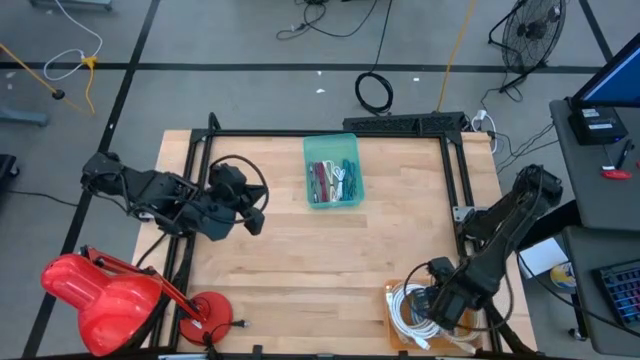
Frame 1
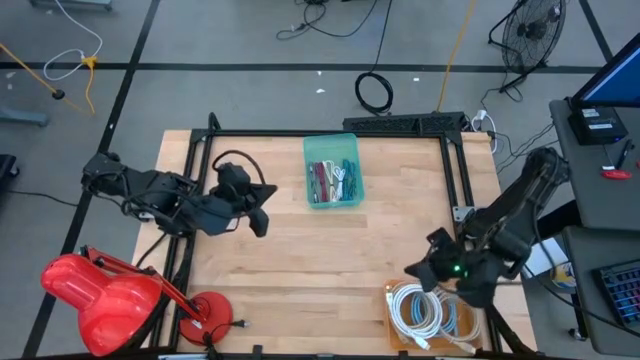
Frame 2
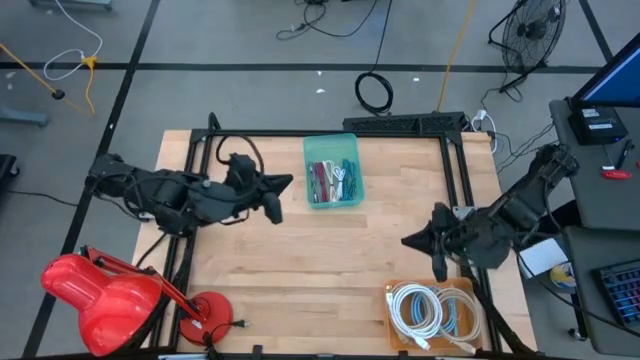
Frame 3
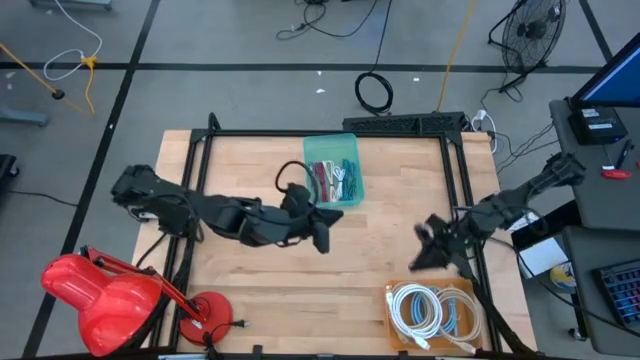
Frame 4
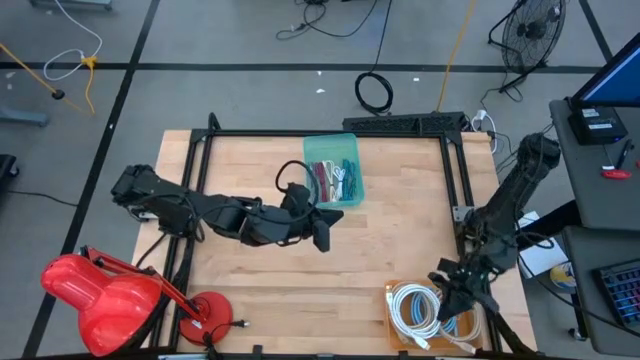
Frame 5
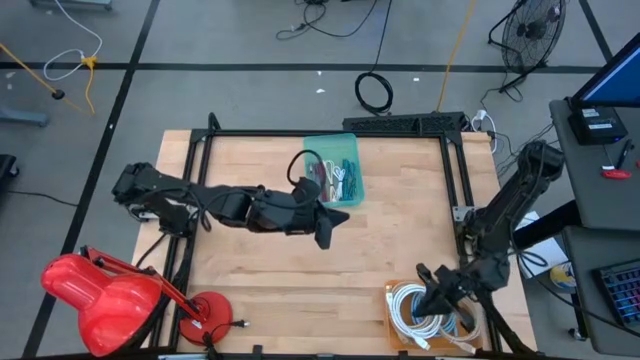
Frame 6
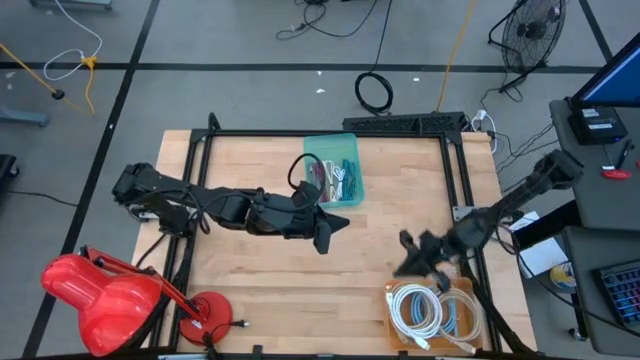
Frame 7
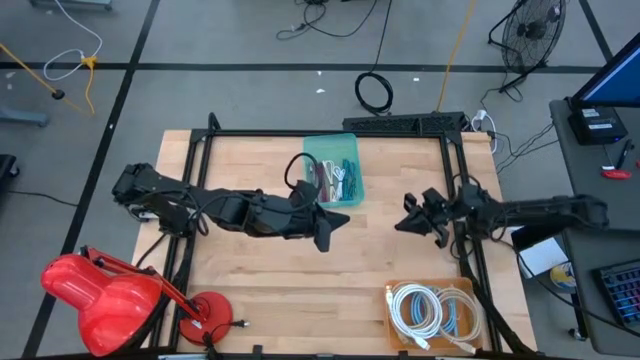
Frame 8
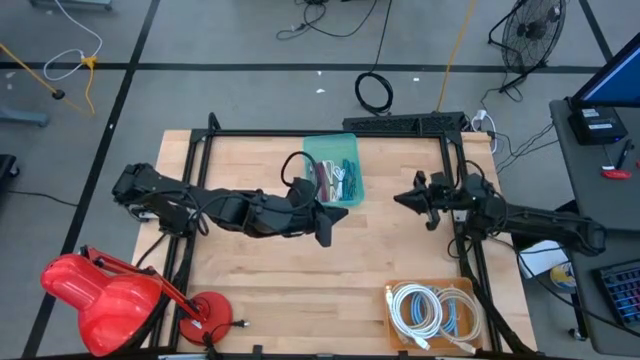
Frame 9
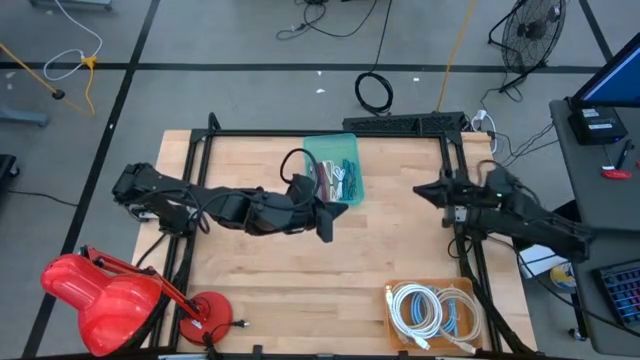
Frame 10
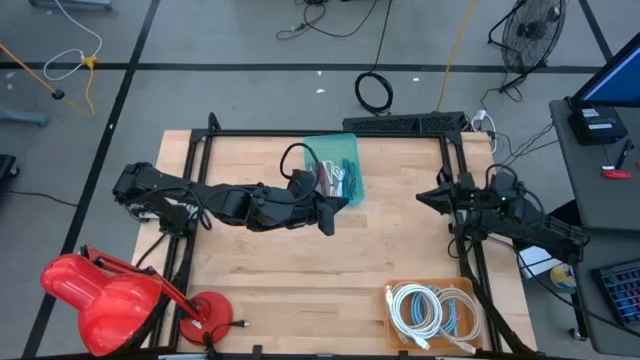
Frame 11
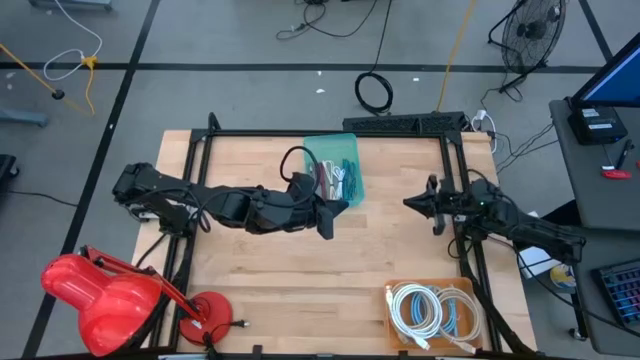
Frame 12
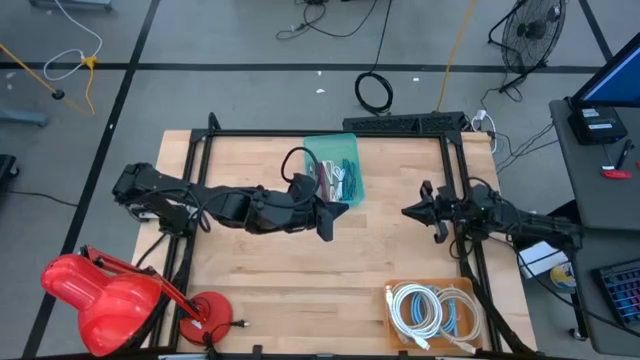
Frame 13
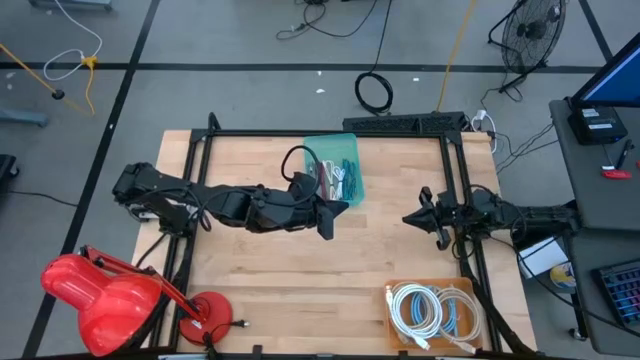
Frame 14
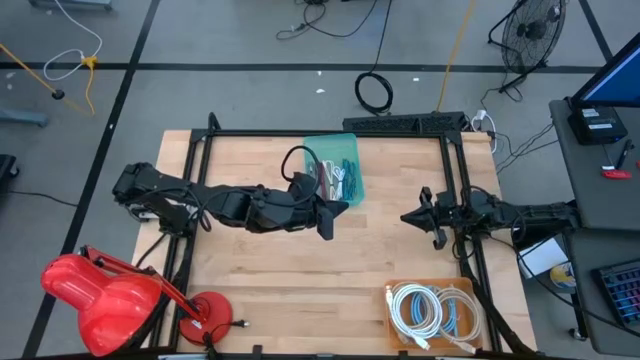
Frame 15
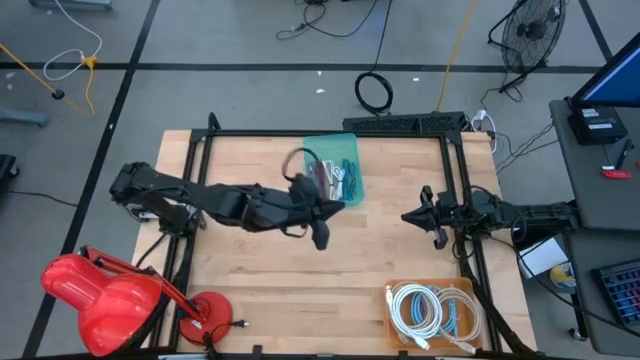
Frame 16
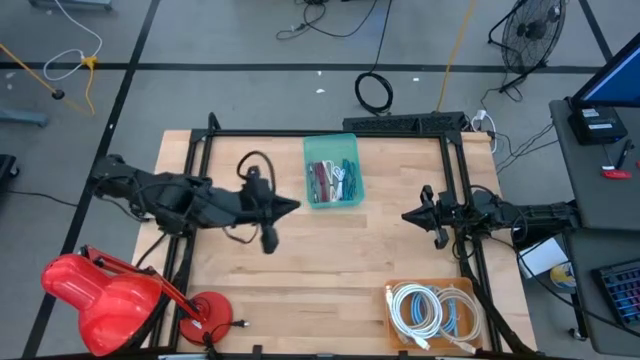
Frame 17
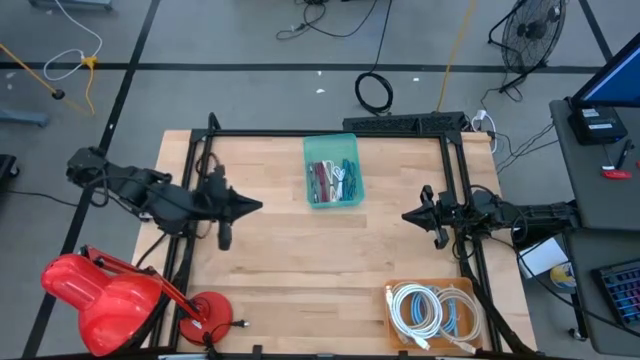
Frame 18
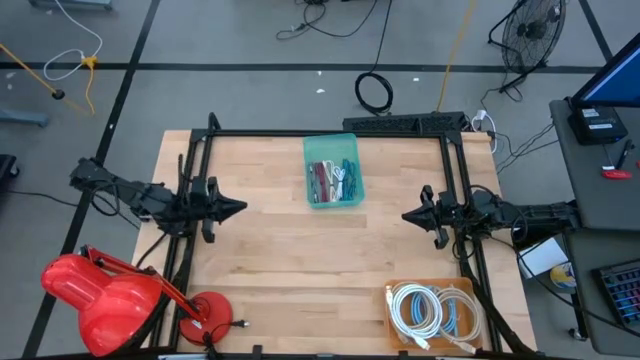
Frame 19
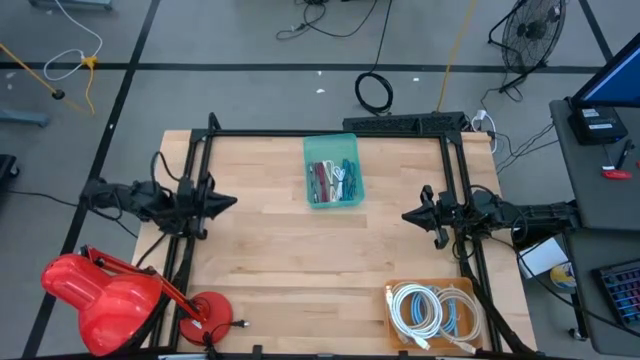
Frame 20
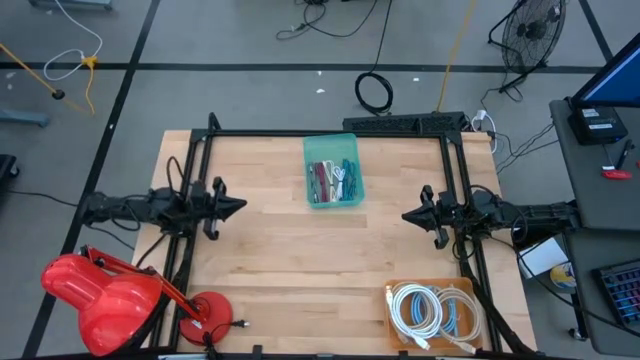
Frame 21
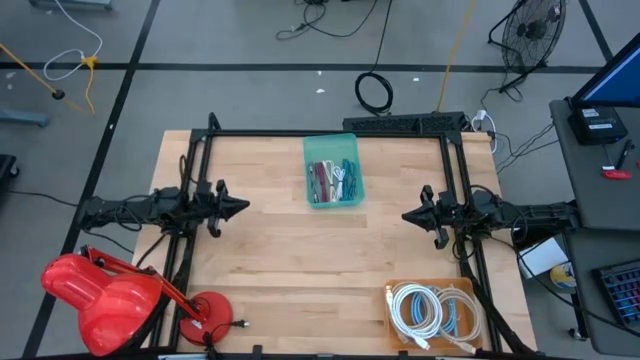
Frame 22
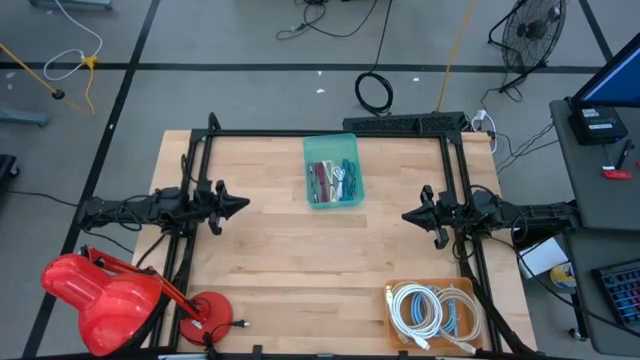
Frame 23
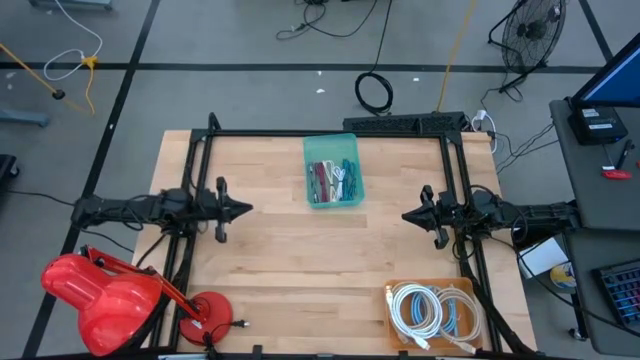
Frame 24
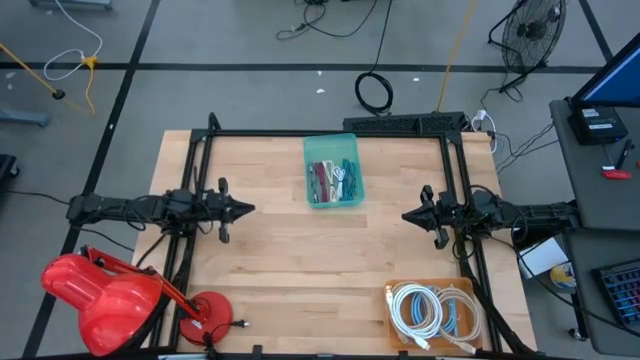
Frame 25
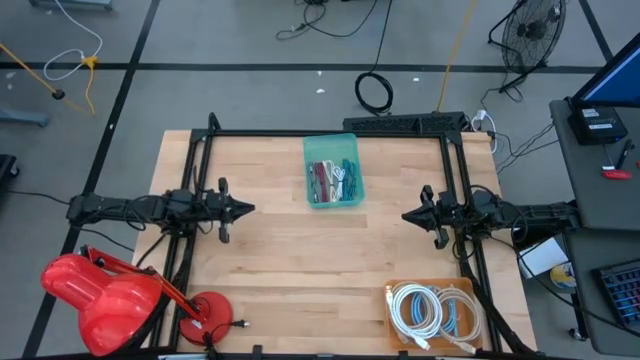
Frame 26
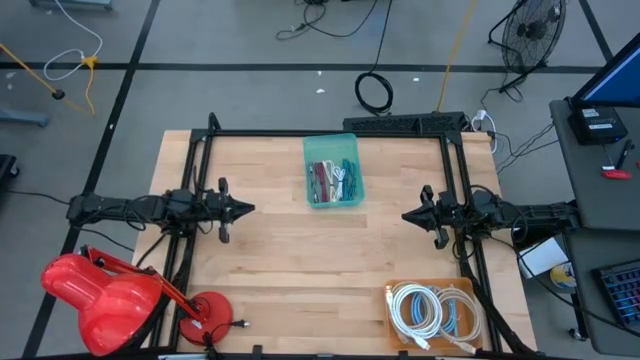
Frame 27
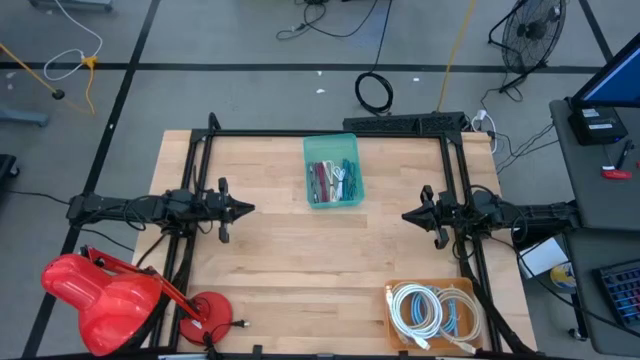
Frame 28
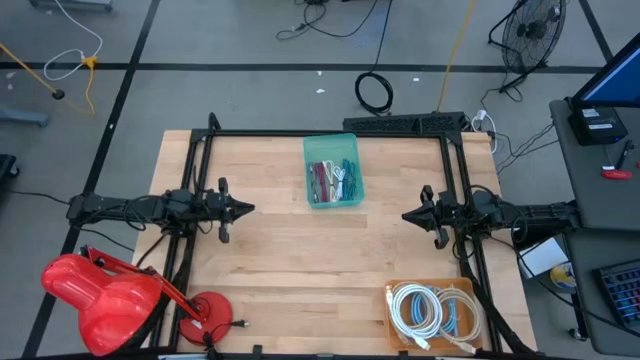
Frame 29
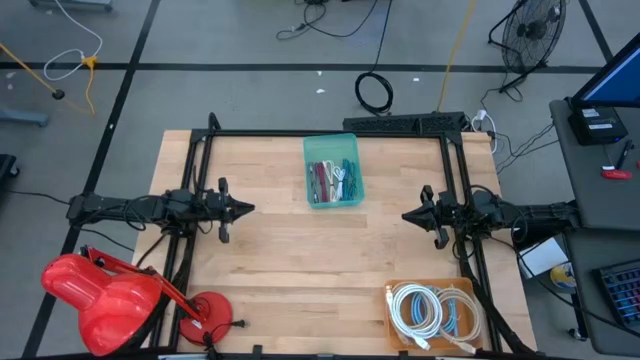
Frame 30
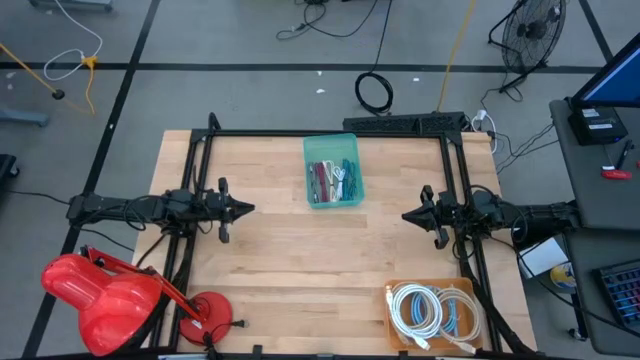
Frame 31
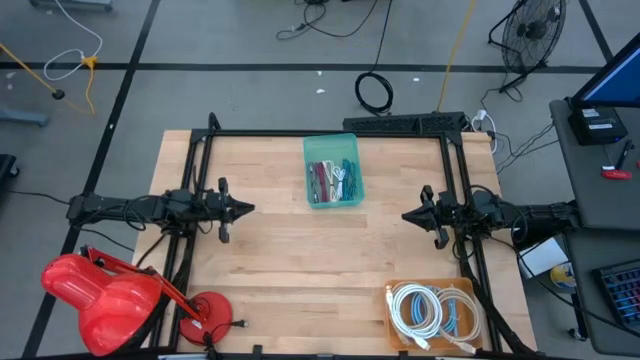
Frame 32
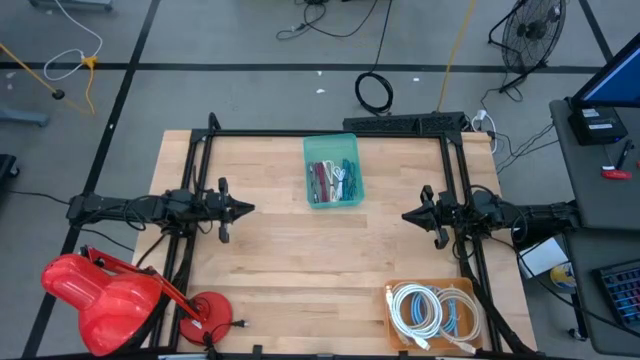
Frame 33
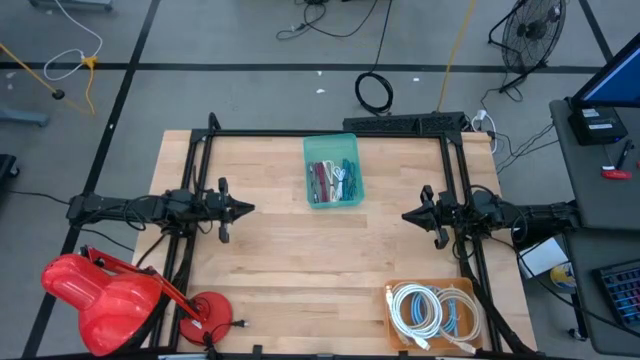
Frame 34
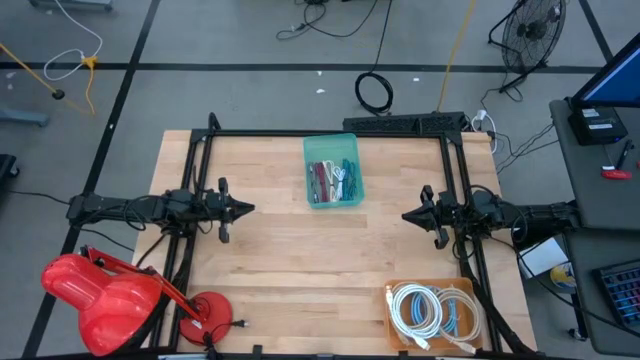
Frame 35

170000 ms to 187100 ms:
Task: Pick & Place USB Port
Return to Home Position

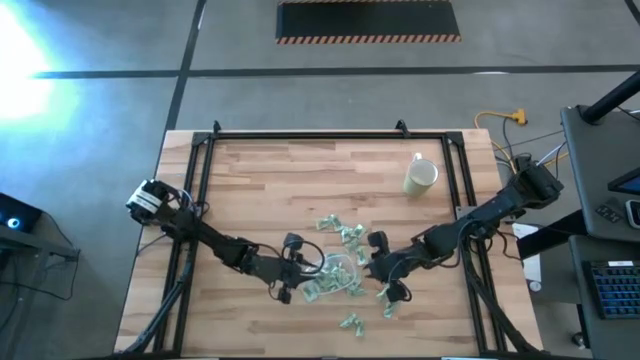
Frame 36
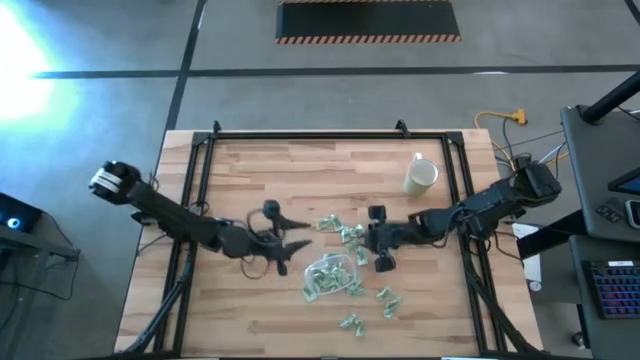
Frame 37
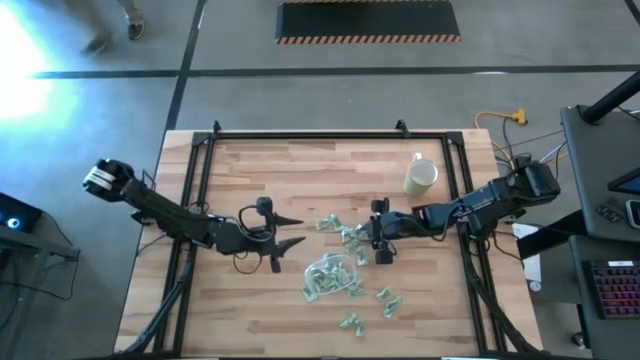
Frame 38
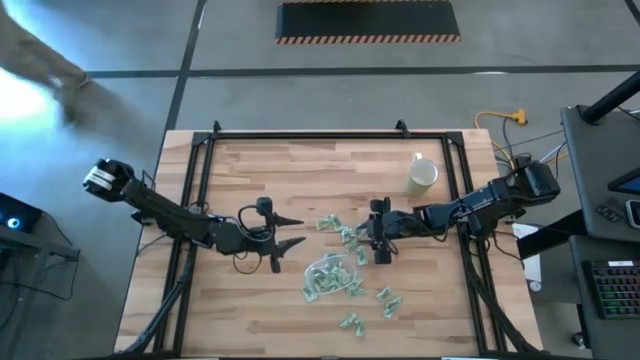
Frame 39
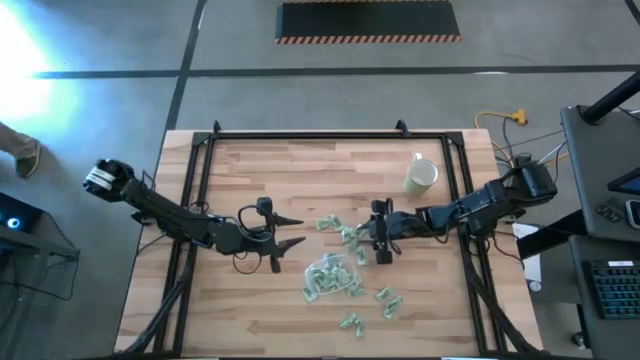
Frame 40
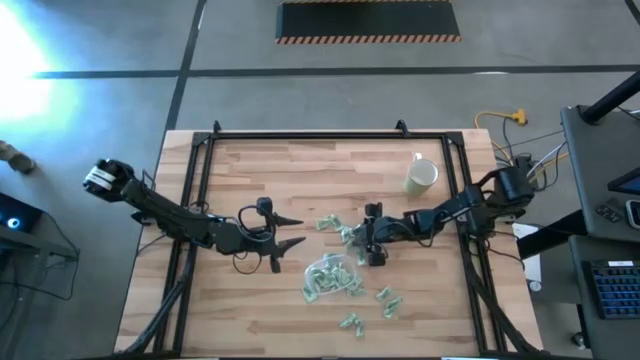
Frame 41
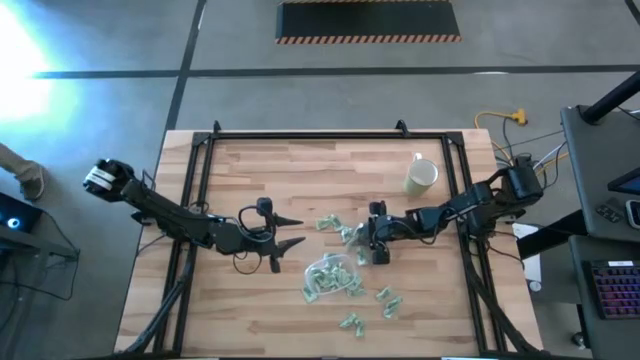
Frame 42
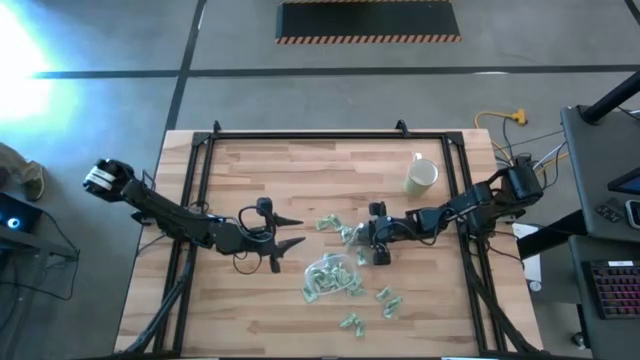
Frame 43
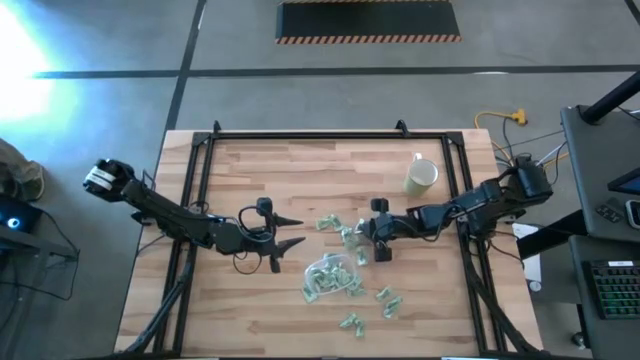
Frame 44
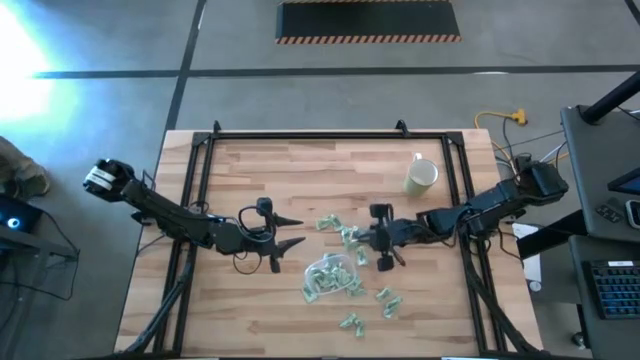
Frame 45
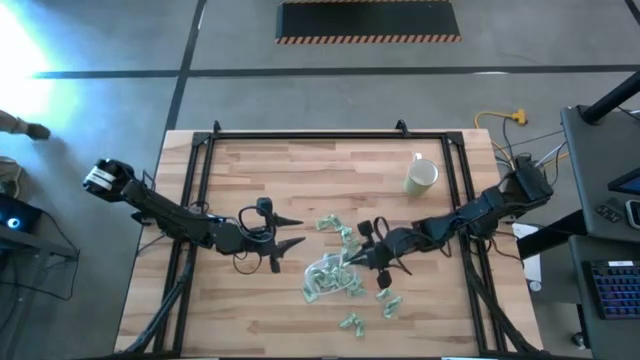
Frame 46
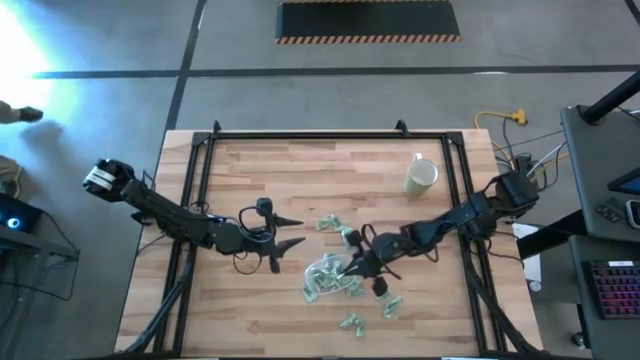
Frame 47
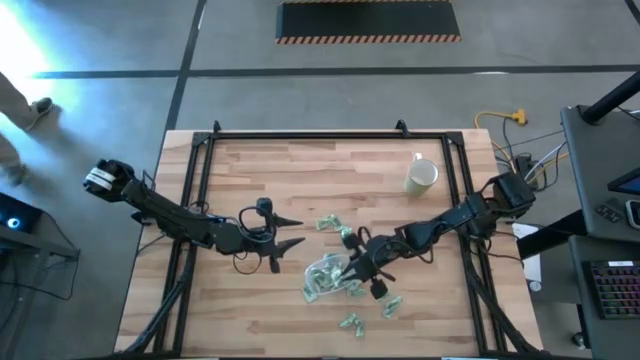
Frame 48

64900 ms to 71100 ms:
Task: Pick and place items into bin
Put the Stevia packet into the transparent bin
